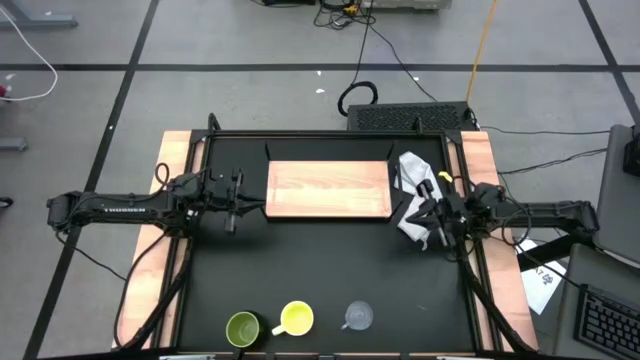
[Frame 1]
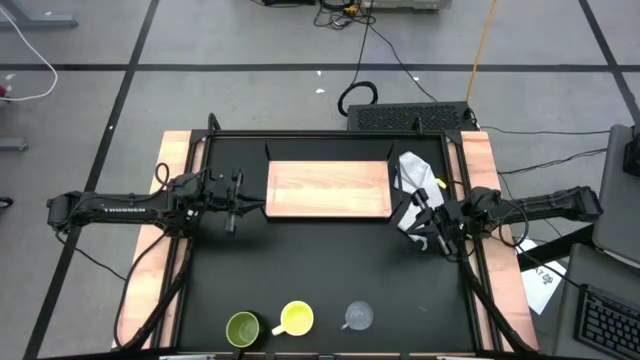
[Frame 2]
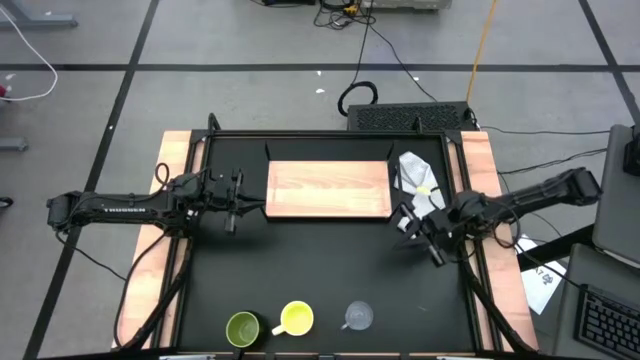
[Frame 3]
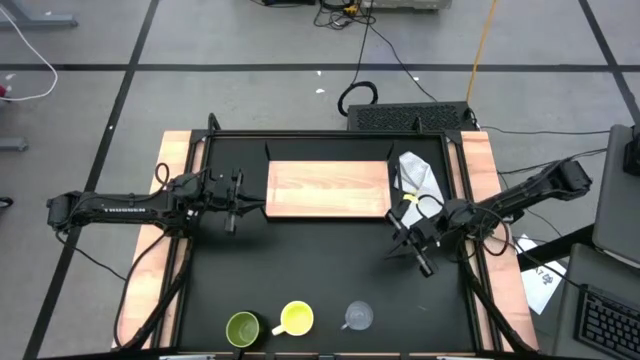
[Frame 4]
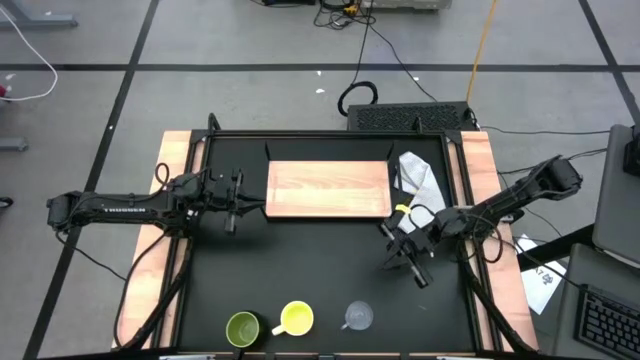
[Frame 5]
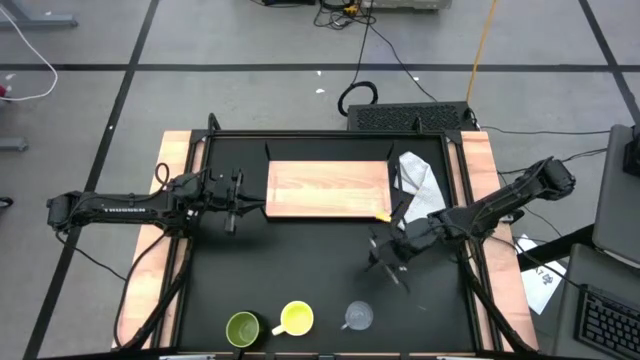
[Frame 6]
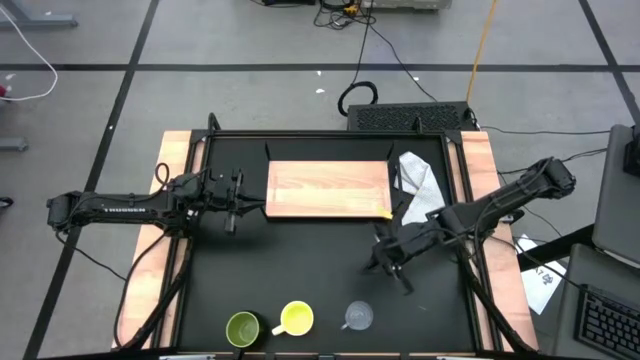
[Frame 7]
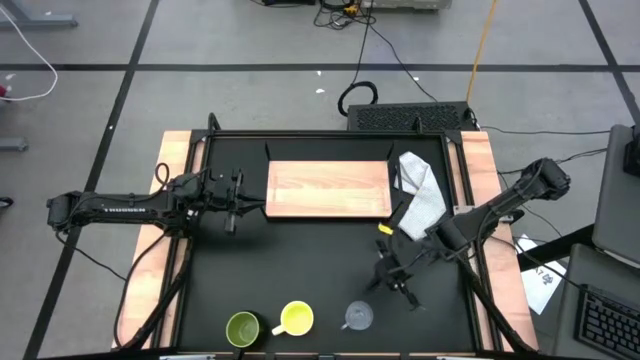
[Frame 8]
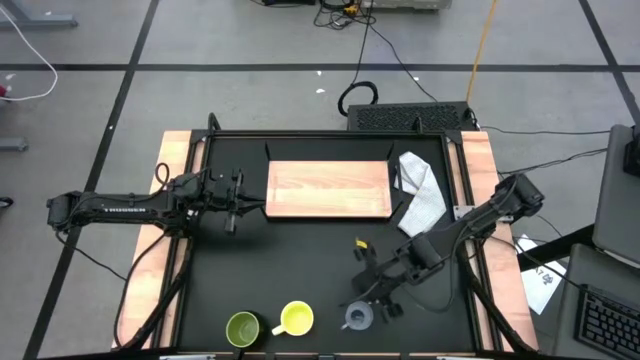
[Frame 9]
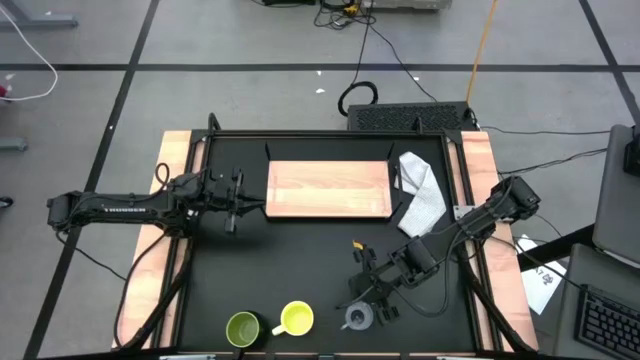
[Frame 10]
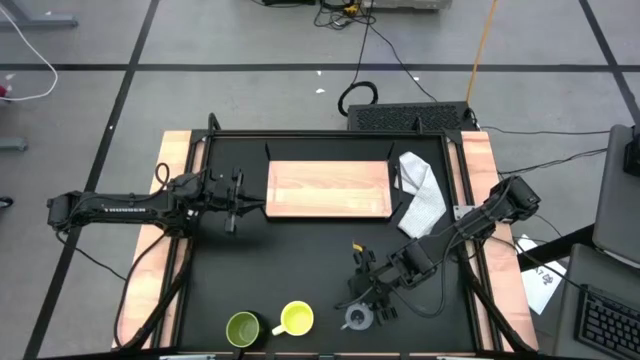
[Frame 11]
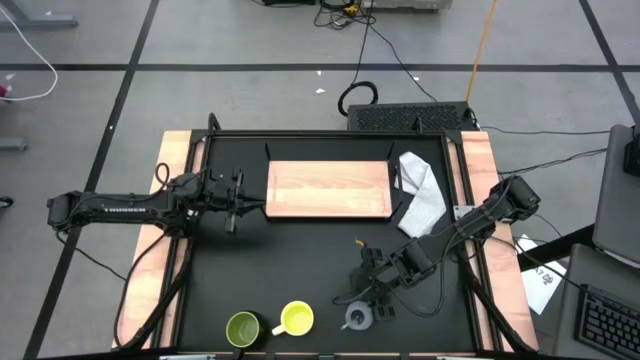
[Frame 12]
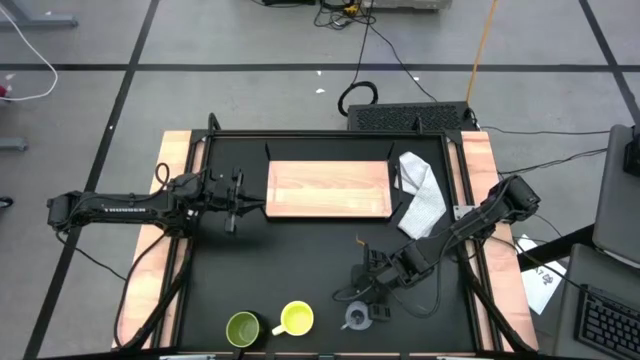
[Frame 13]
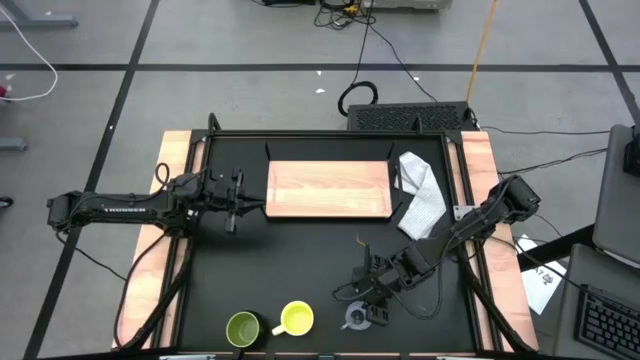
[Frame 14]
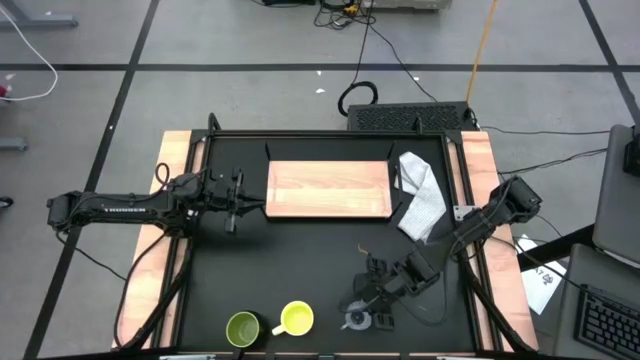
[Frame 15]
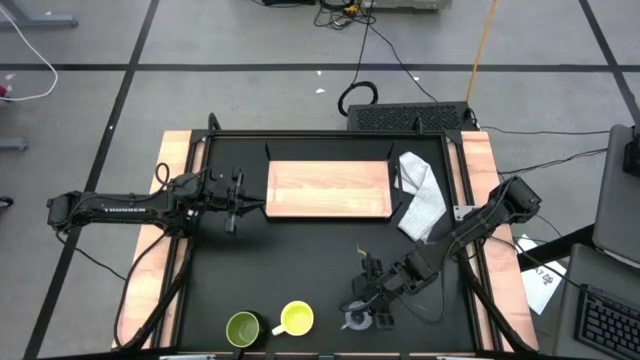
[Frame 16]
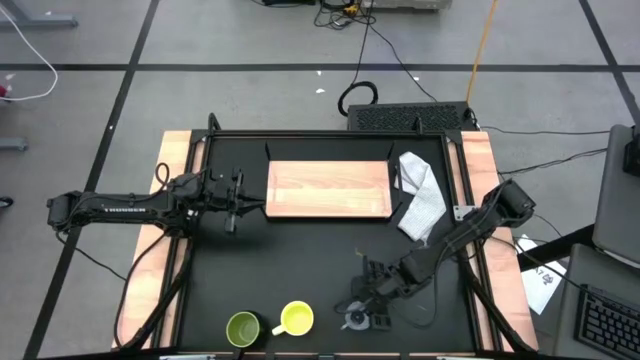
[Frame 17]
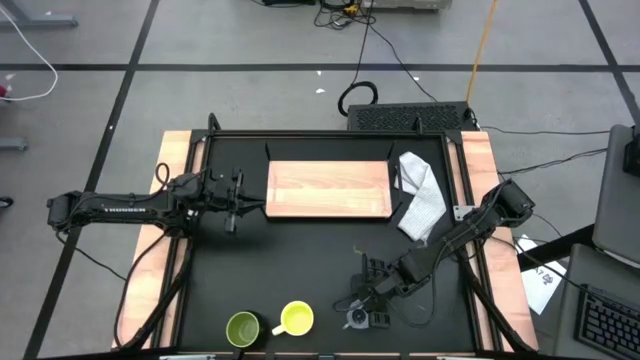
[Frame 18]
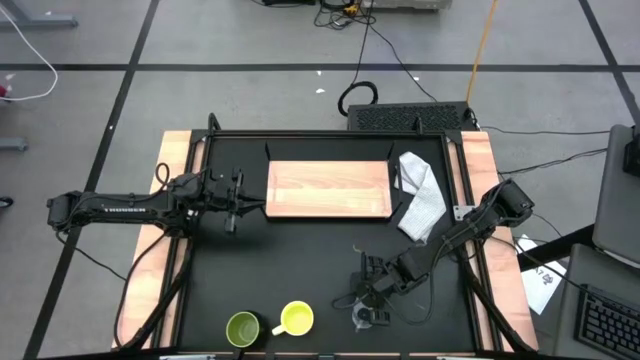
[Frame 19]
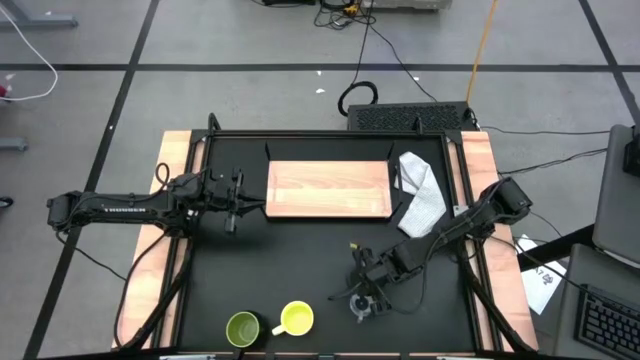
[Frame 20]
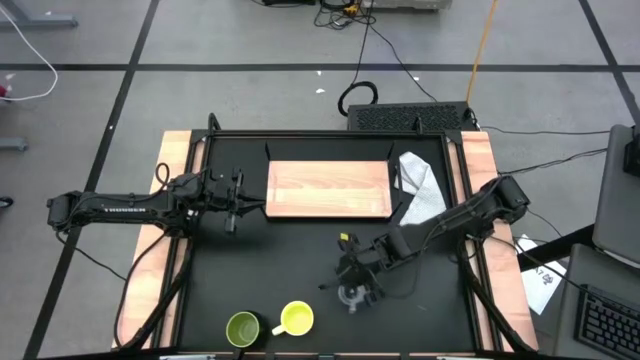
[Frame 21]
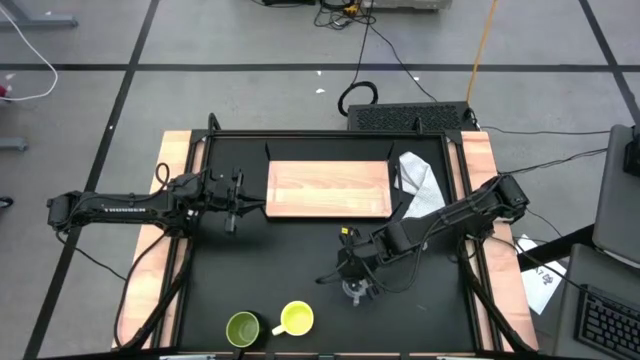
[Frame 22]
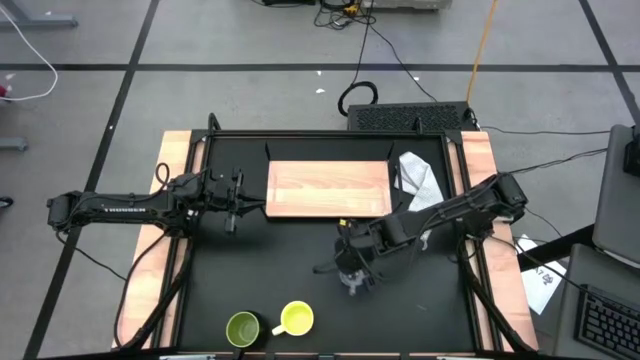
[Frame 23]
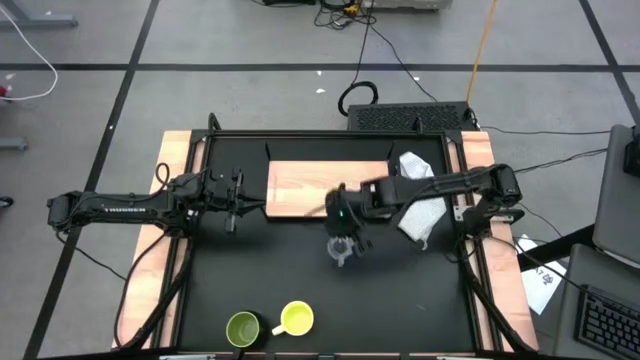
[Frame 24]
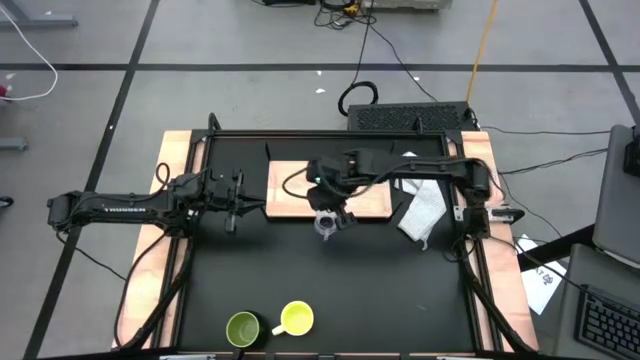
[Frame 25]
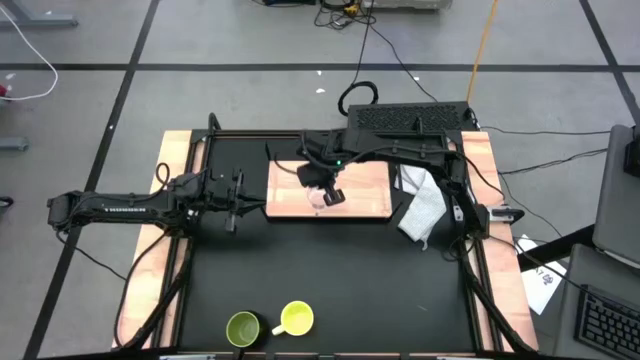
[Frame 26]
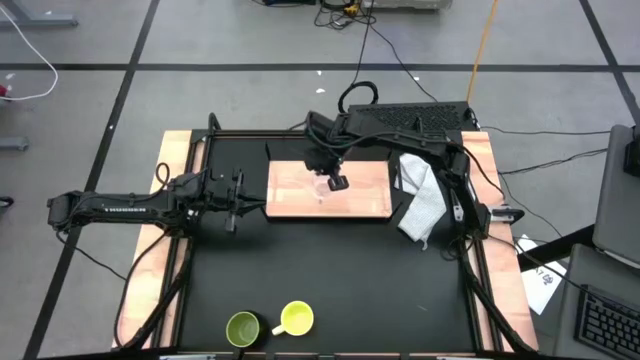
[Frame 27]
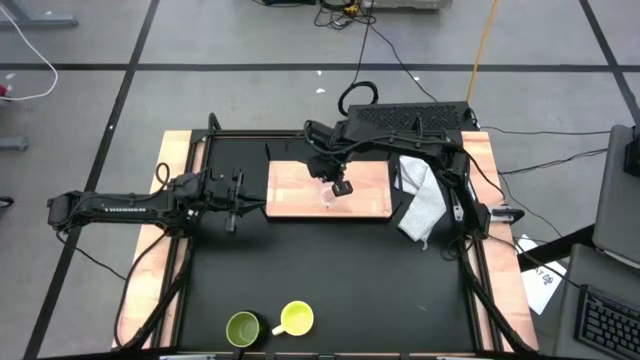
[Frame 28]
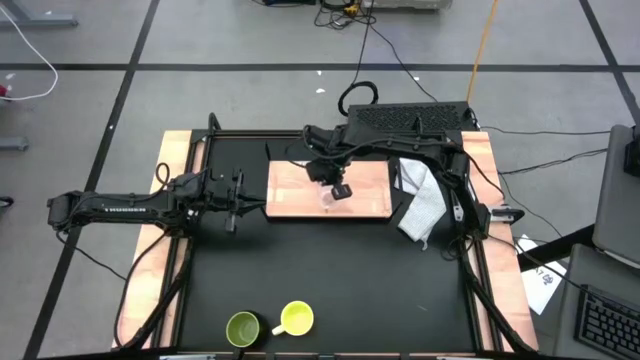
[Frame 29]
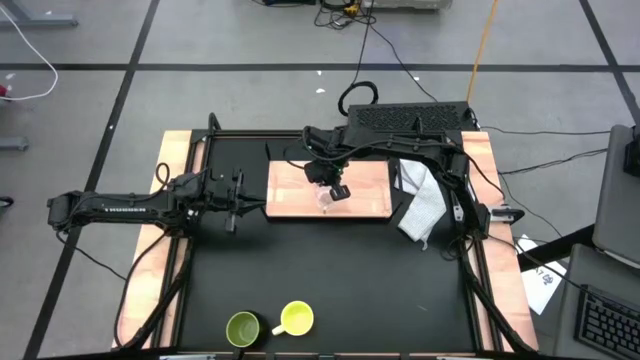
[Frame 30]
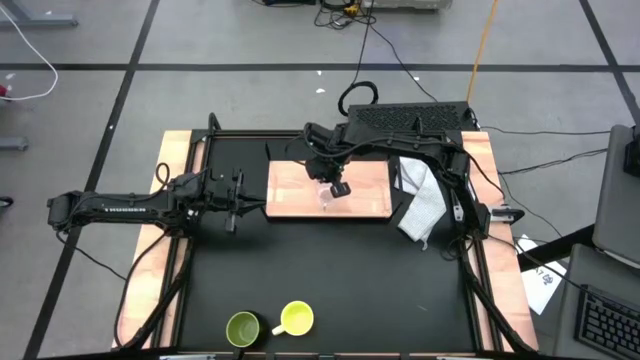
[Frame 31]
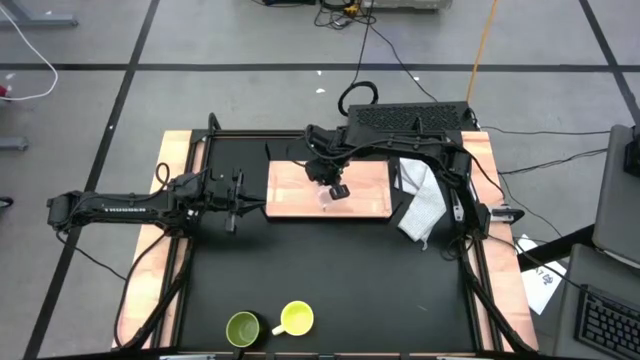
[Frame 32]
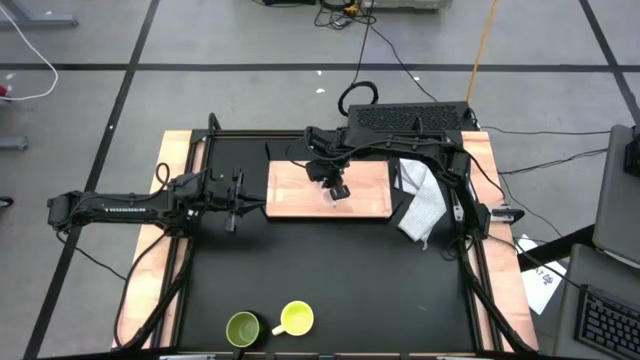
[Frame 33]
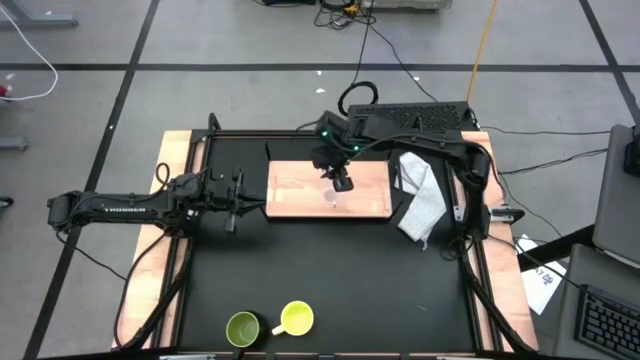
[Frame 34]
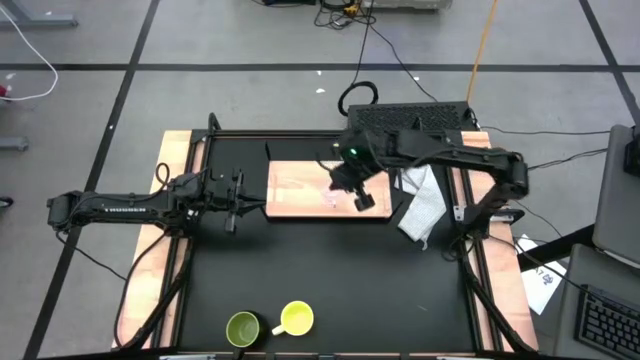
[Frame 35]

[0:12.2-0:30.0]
Task: Stack small to large cups/mugs on shelf
Put the transparent mug on the shelf

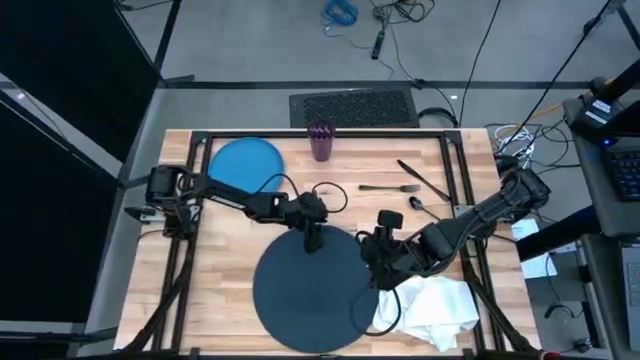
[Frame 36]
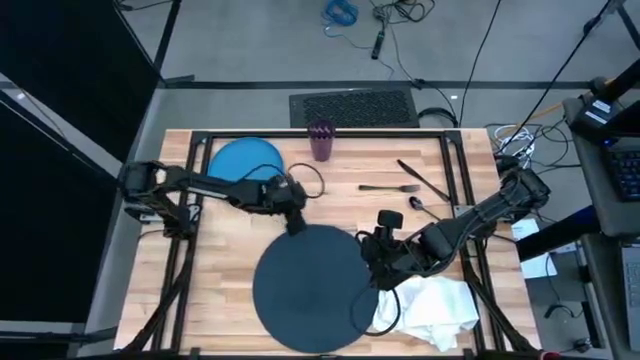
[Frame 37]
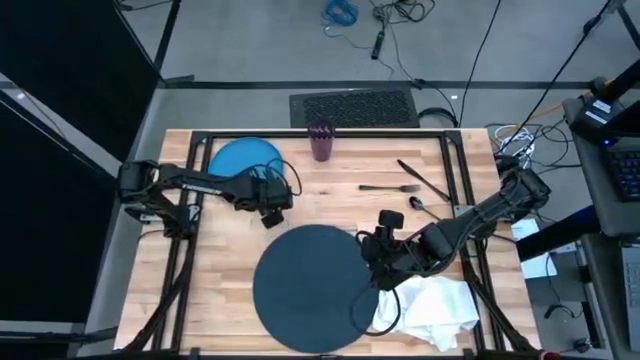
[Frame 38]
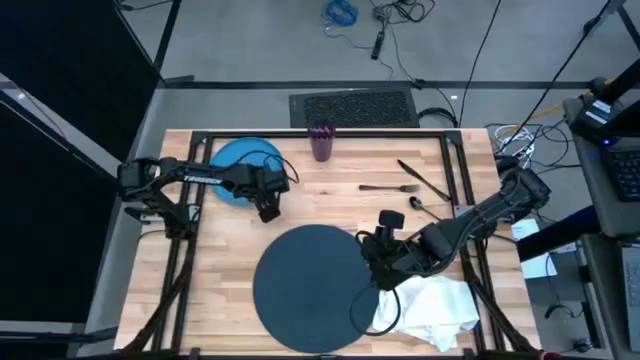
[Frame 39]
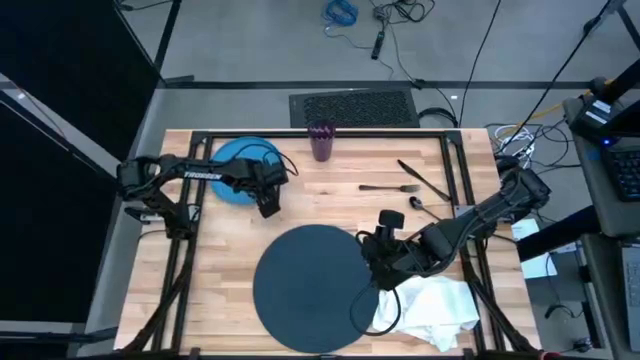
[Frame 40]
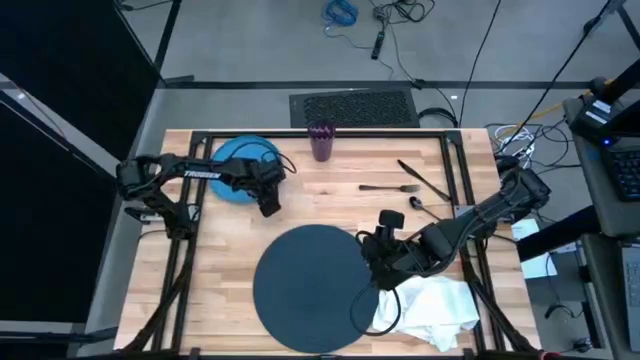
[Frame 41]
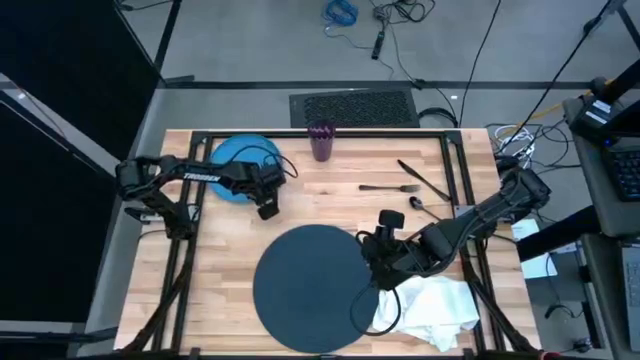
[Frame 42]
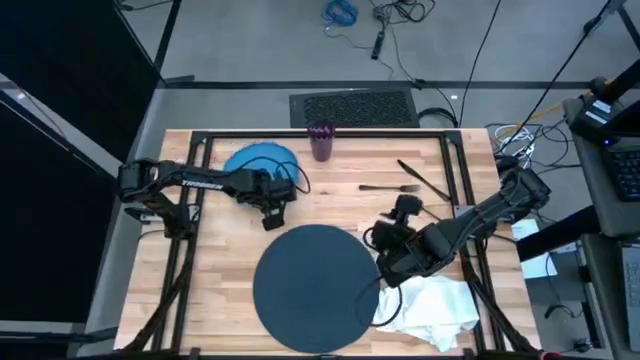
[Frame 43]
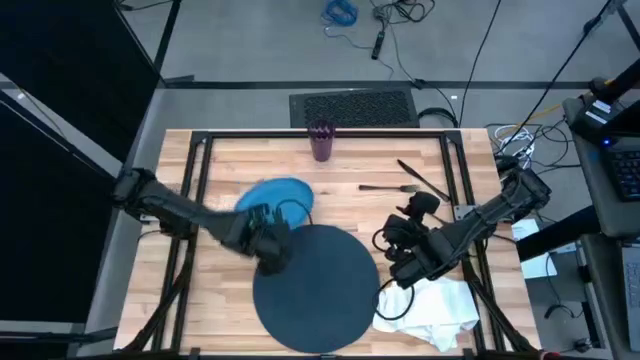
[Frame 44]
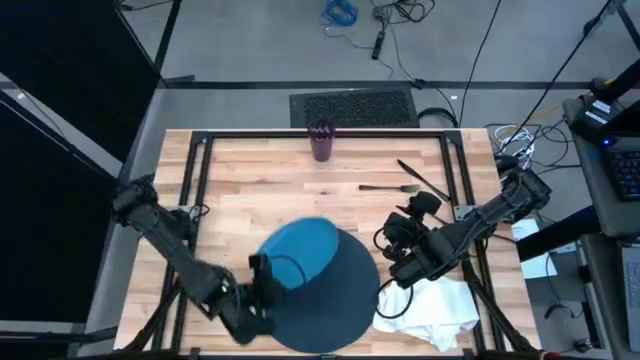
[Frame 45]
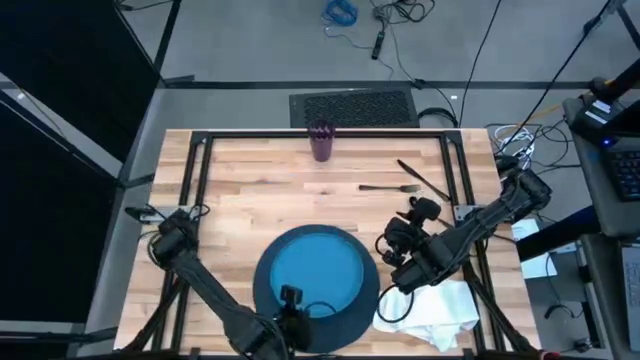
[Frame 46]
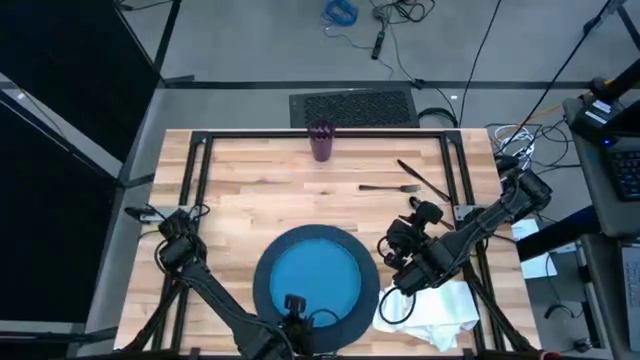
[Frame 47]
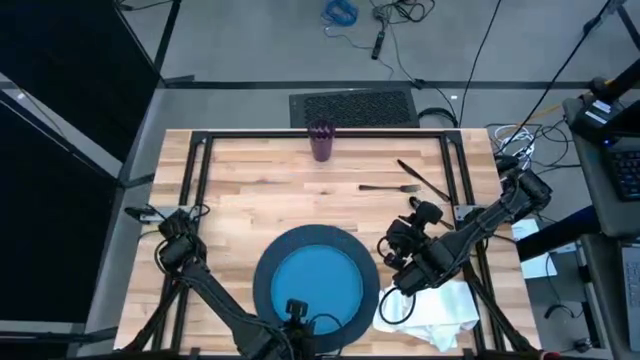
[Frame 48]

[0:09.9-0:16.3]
Task: Set table place
Put the blue plate on the dark blue placemat
